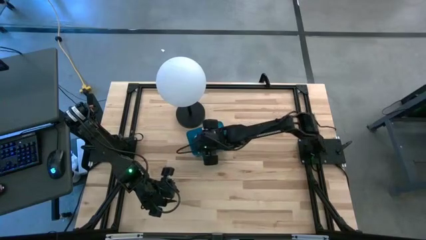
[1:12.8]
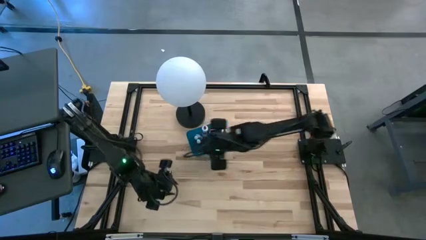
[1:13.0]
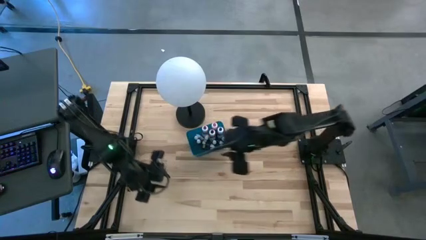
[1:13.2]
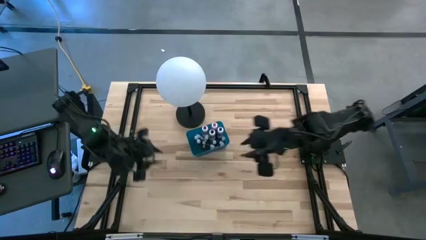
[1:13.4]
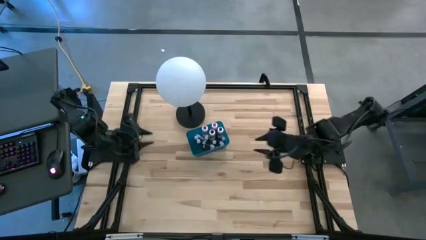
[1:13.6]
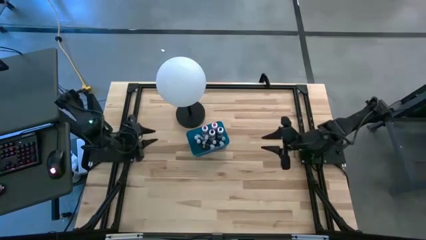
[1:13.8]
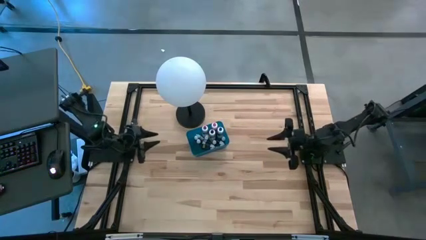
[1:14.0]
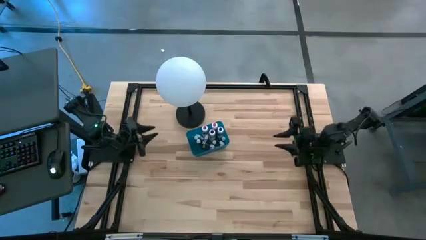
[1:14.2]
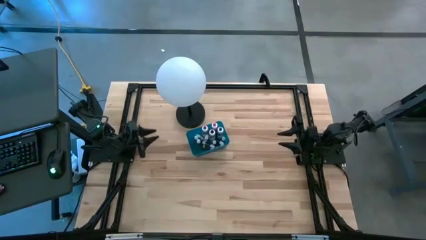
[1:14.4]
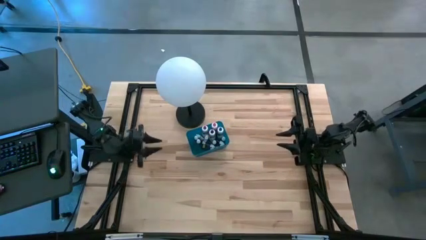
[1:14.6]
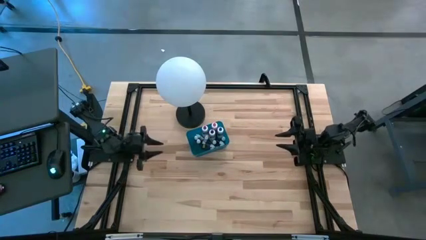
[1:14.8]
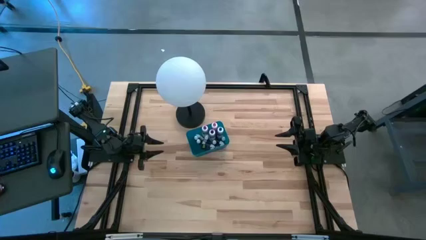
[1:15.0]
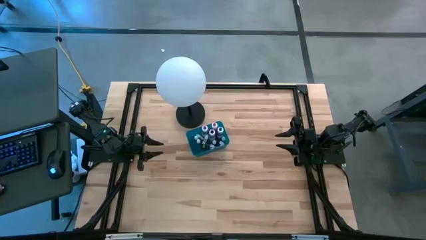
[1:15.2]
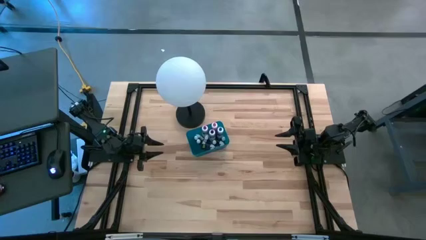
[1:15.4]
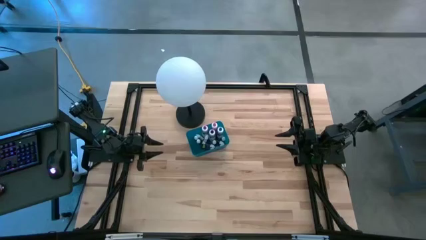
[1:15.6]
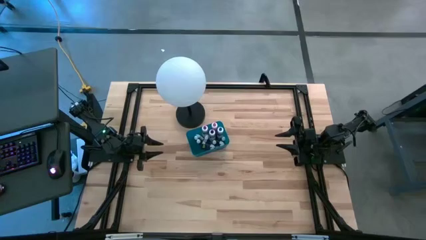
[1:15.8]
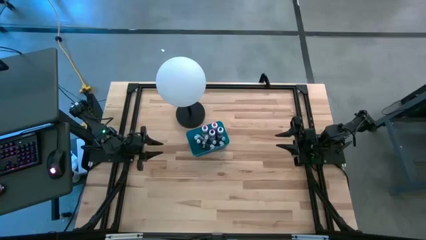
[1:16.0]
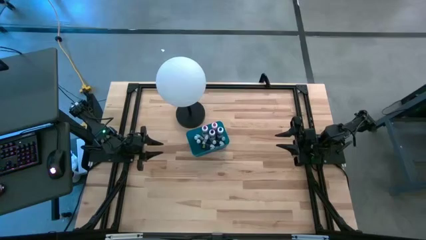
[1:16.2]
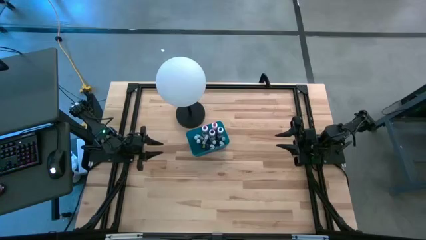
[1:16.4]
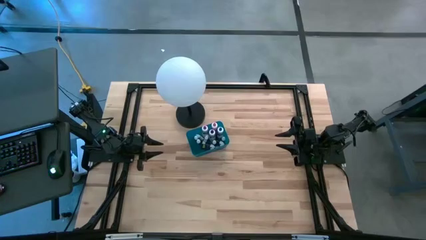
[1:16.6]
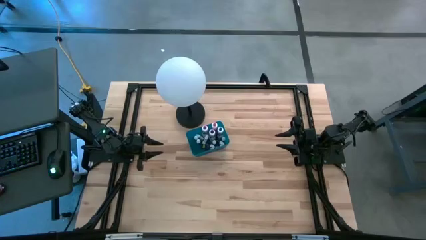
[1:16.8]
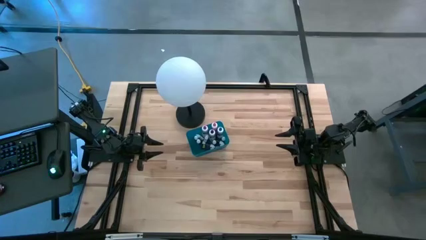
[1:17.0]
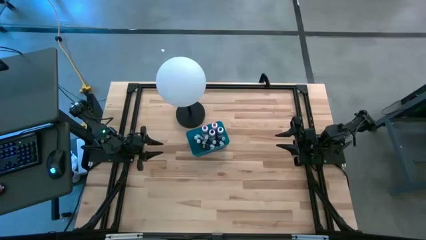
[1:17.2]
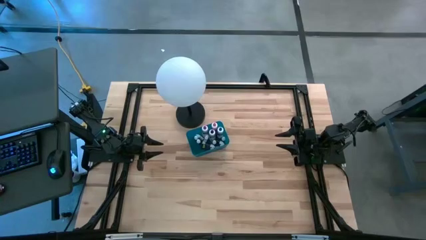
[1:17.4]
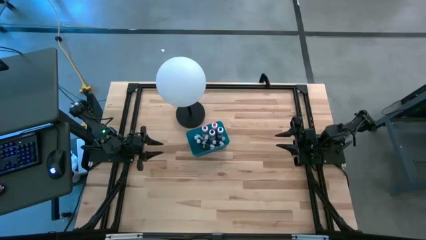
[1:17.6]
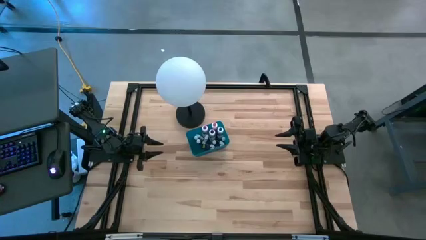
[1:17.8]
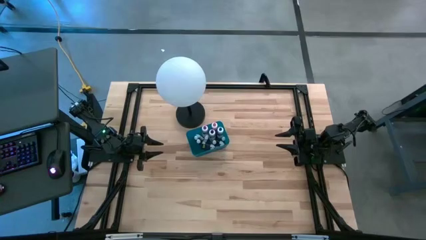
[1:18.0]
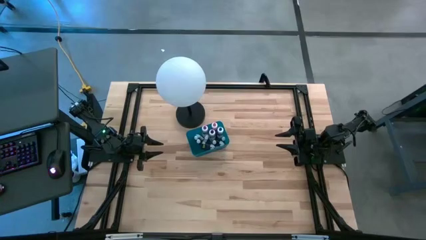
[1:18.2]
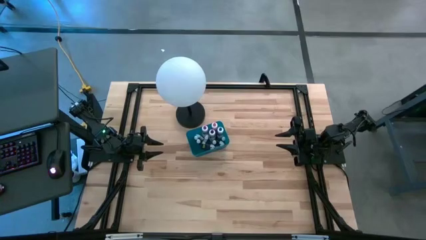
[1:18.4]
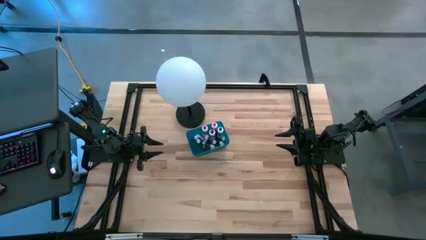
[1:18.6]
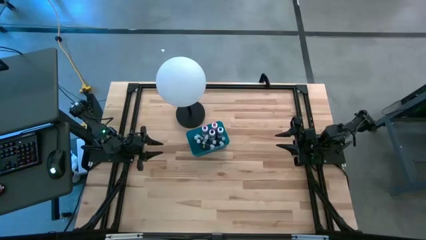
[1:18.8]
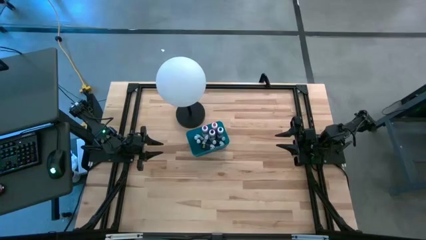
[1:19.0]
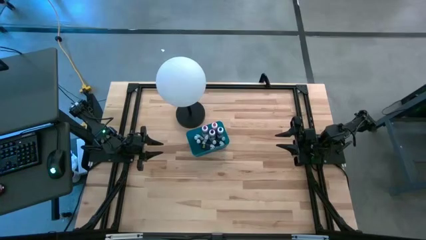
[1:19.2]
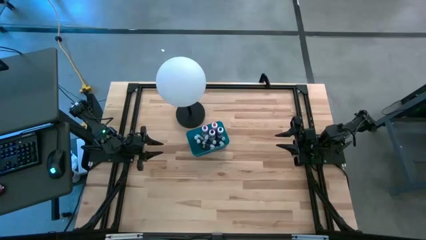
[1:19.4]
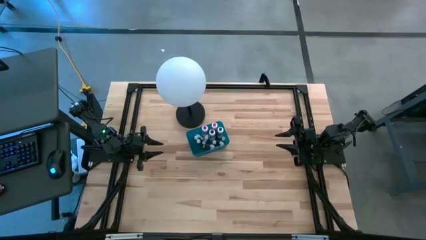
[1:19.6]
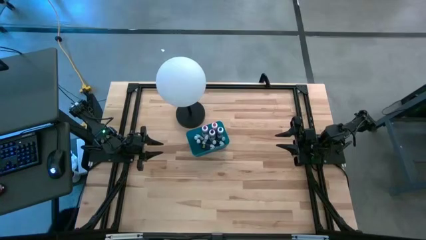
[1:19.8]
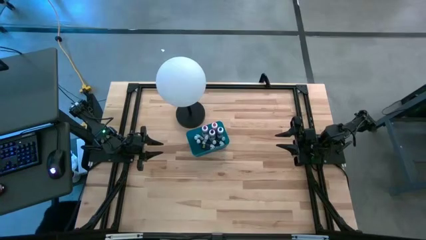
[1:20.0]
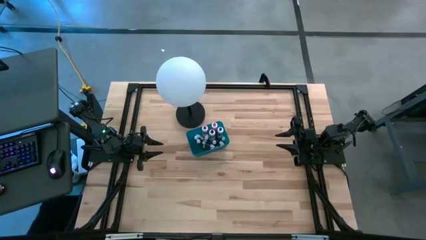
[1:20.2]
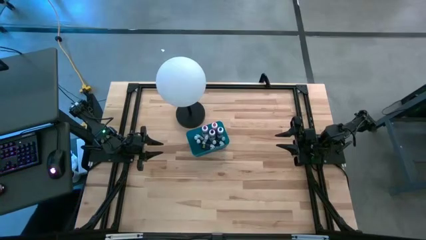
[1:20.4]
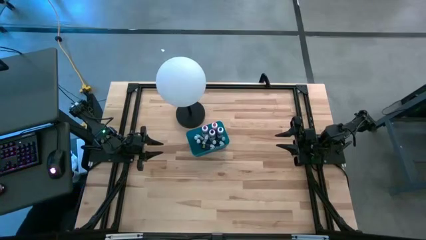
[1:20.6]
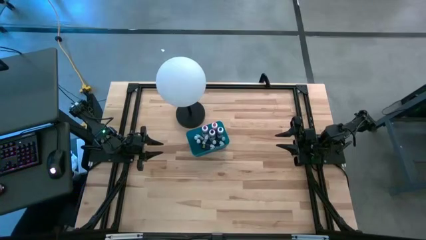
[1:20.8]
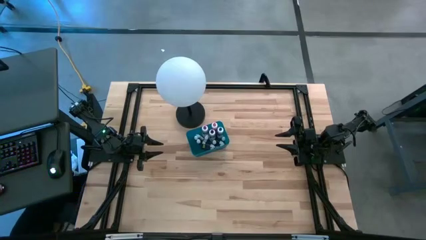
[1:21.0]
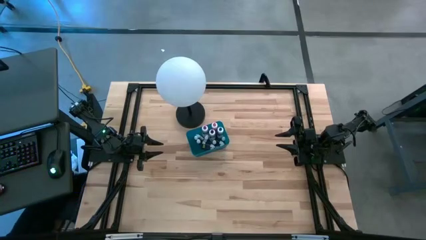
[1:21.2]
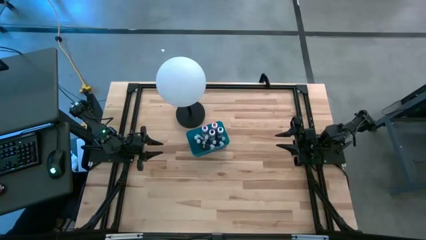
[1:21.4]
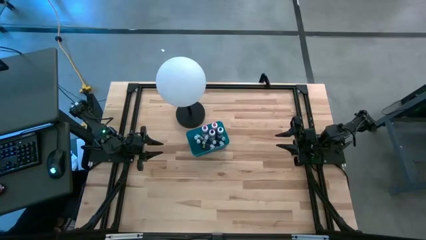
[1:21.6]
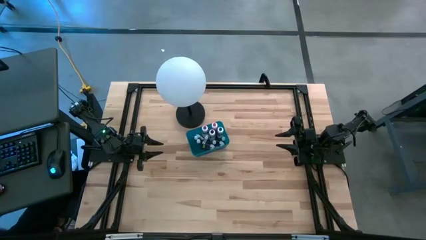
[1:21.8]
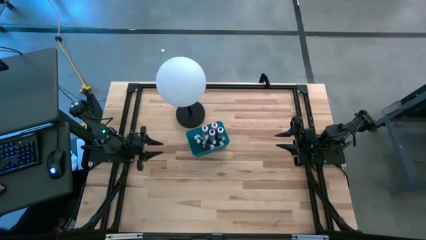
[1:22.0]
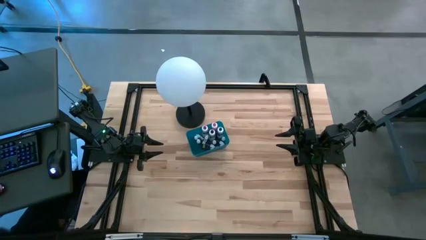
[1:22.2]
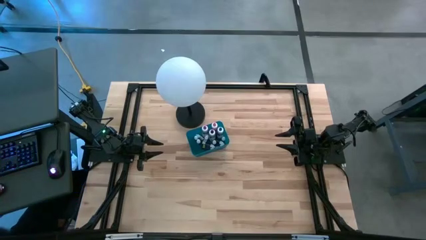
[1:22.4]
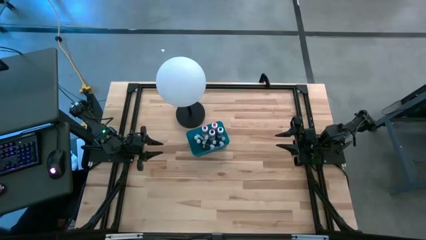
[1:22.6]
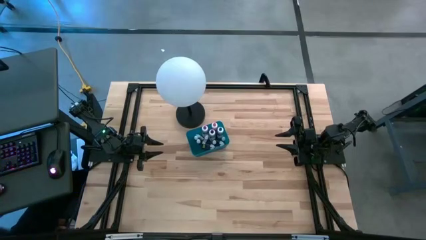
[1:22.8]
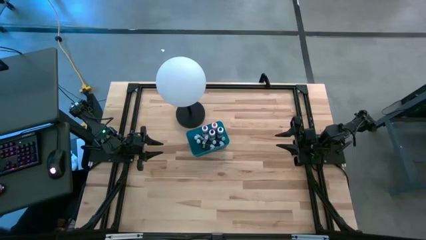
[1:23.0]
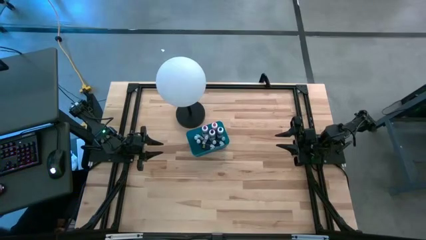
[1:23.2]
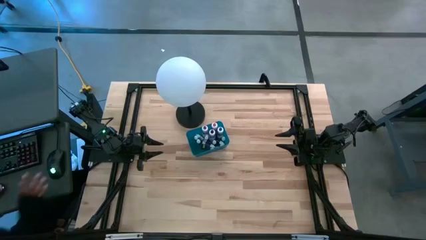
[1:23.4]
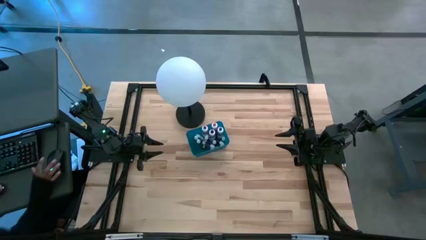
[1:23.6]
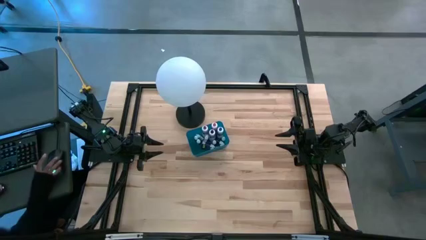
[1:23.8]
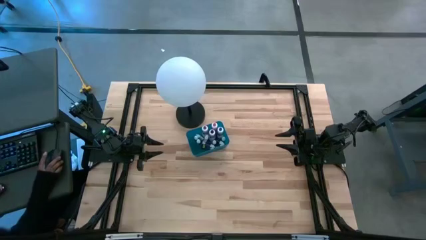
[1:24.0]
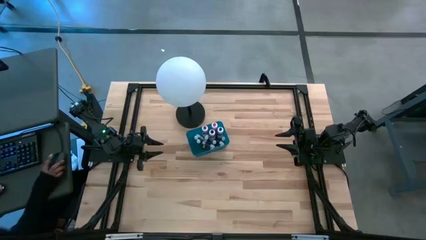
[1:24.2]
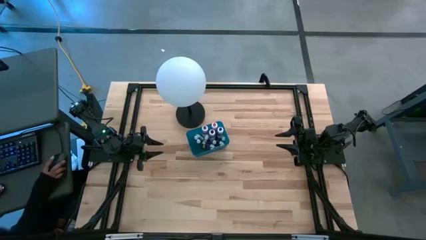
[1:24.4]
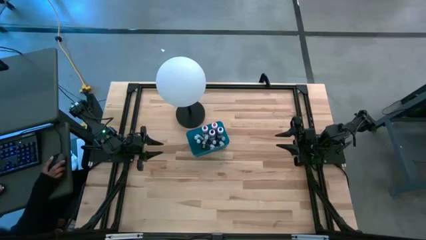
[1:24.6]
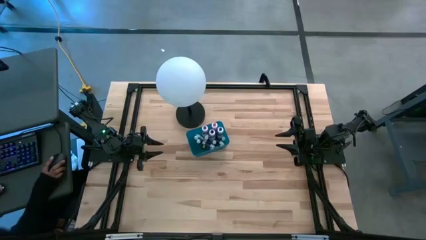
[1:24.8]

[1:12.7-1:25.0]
Task: Pick & Place food coloring
Return to home position
